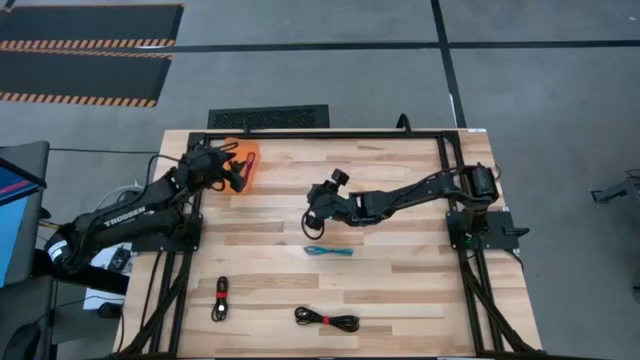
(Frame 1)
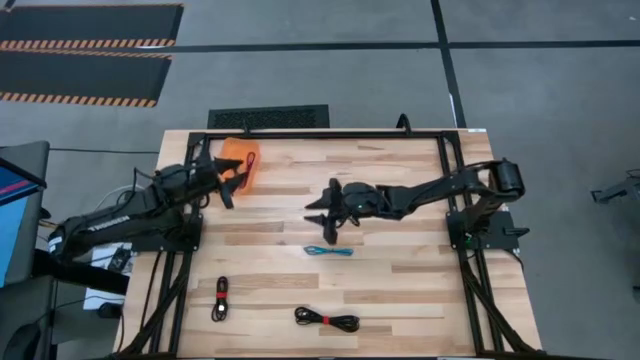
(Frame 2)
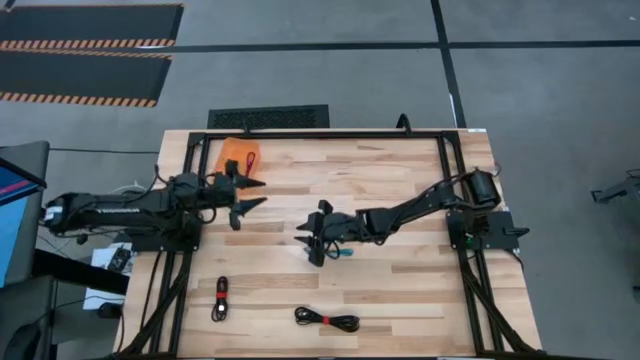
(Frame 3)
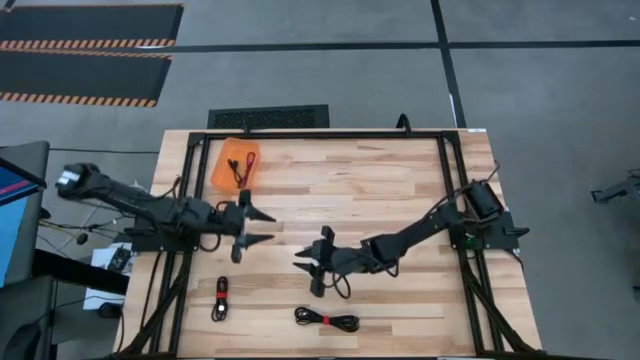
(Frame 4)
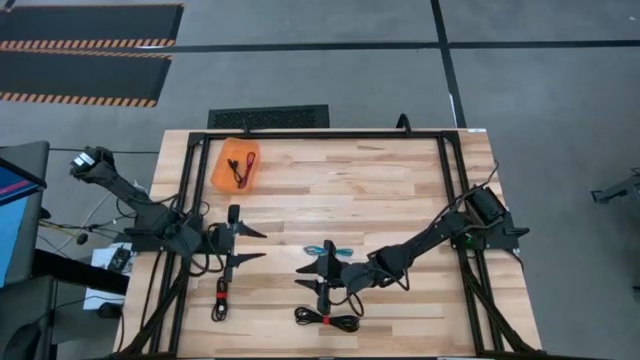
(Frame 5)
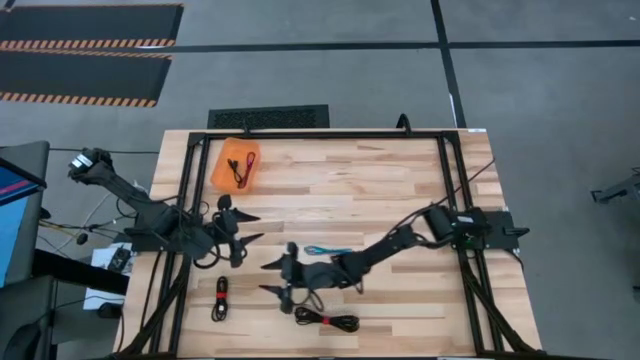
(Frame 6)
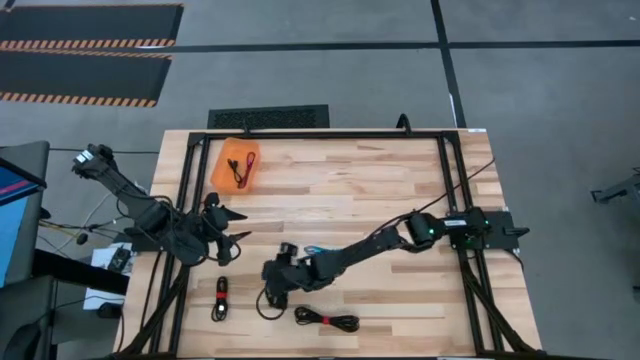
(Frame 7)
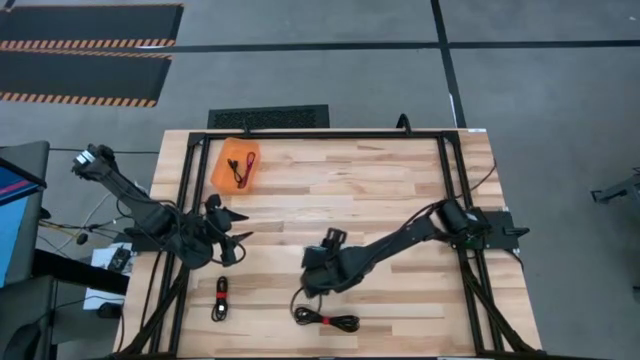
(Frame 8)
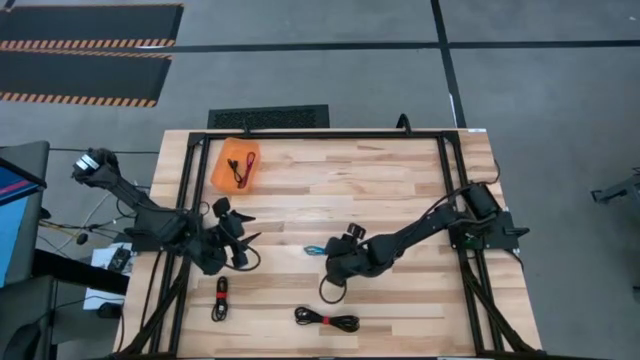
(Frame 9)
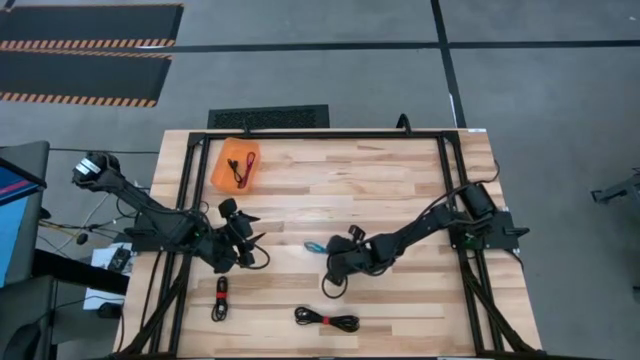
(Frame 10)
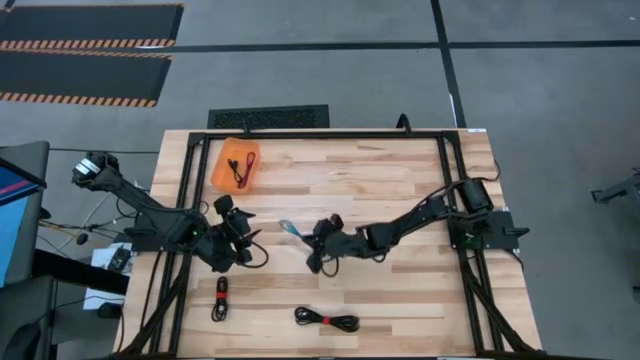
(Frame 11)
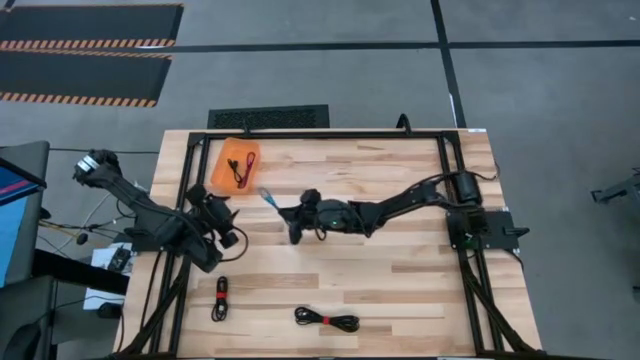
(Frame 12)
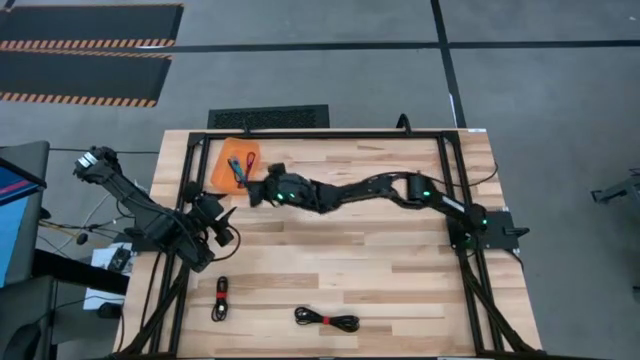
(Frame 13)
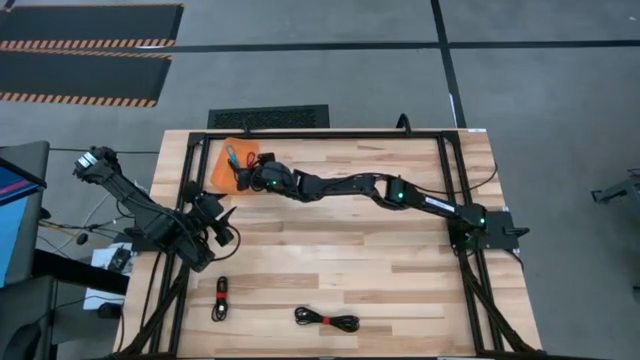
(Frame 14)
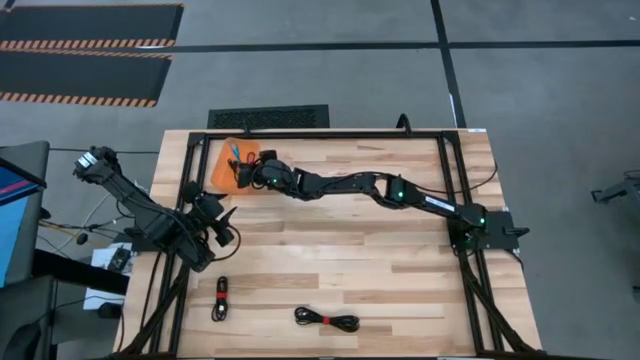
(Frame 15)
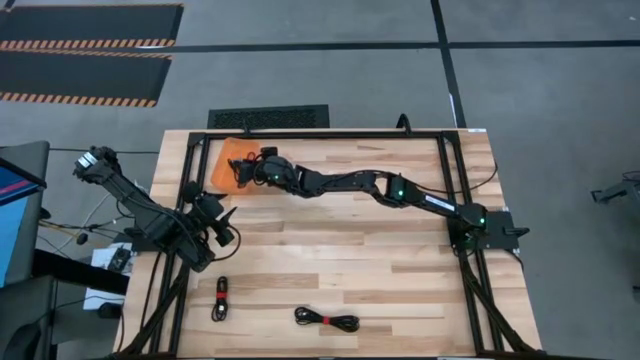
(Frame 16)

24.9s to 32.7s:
Task: Pick and place USB-C Cables
Put the blue charger cable into the orange bin

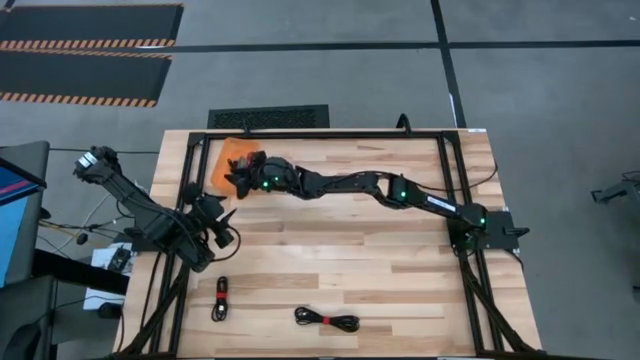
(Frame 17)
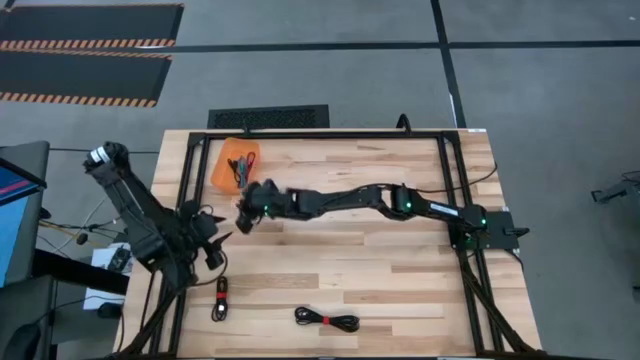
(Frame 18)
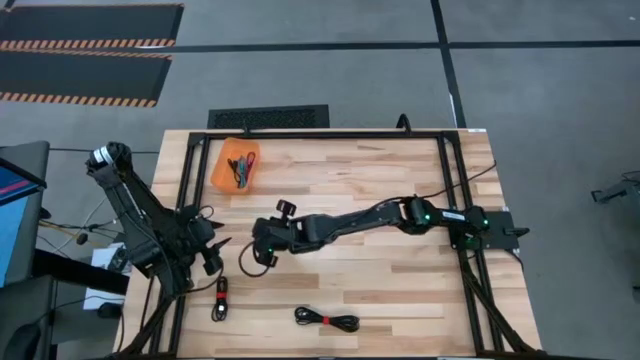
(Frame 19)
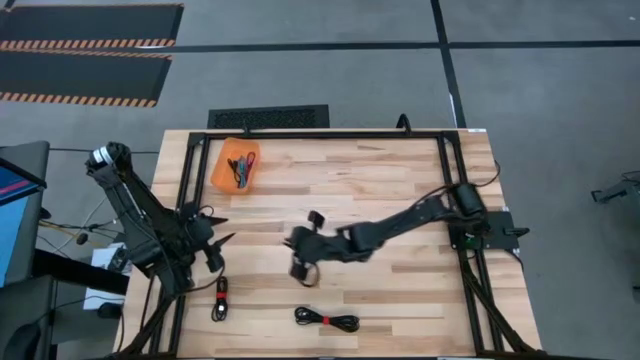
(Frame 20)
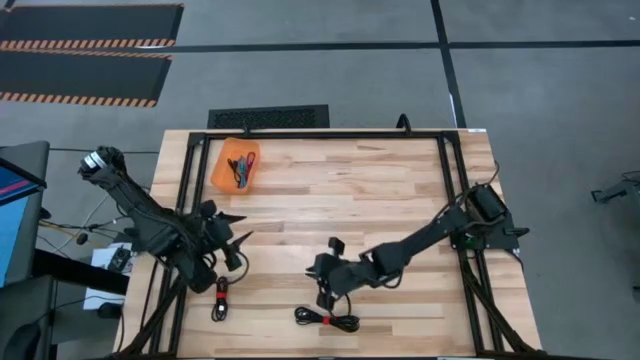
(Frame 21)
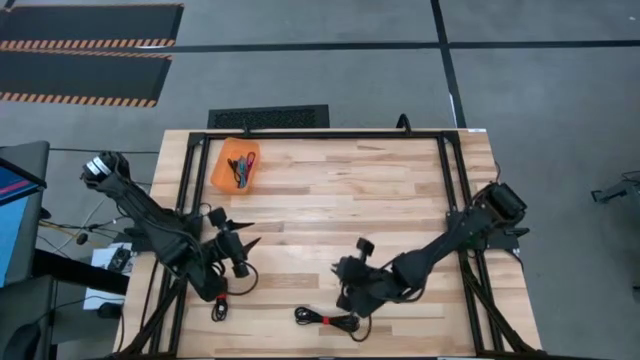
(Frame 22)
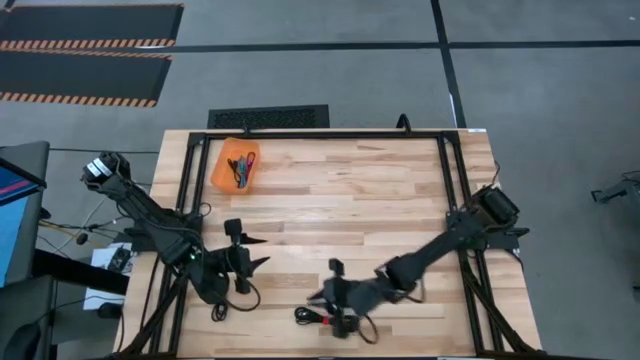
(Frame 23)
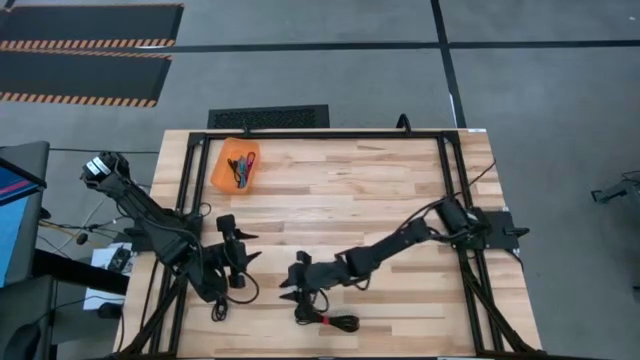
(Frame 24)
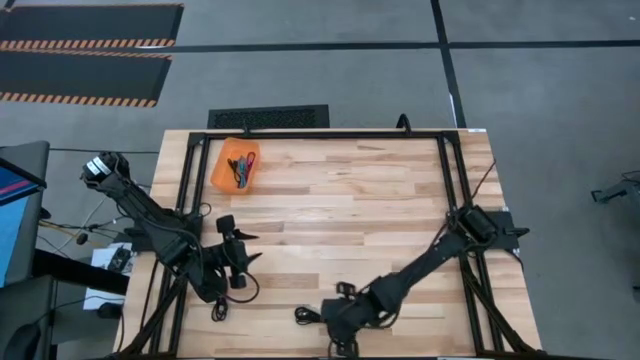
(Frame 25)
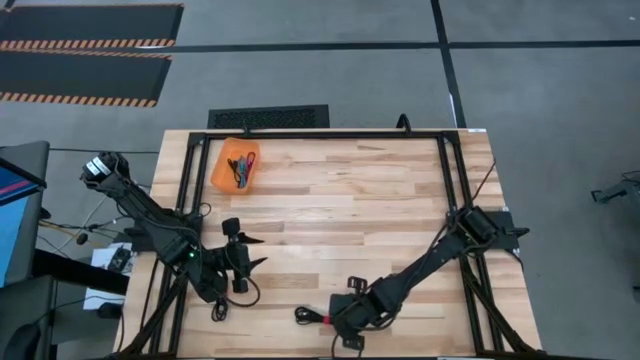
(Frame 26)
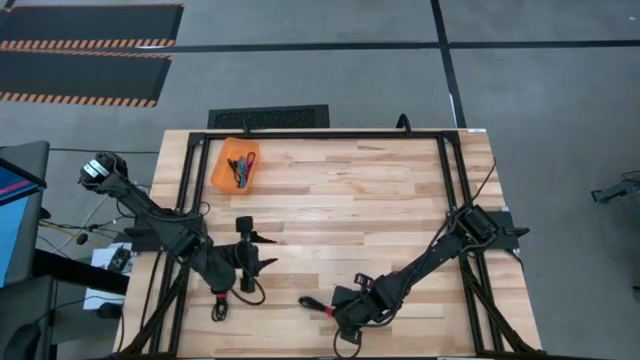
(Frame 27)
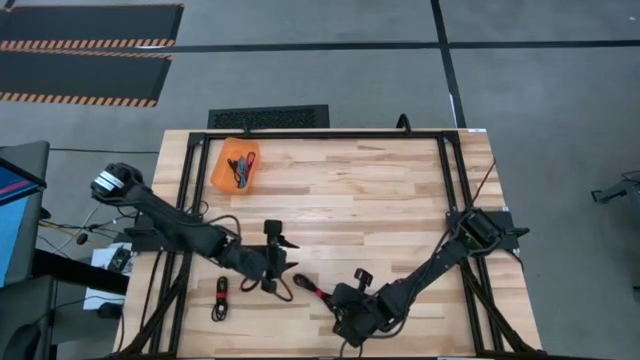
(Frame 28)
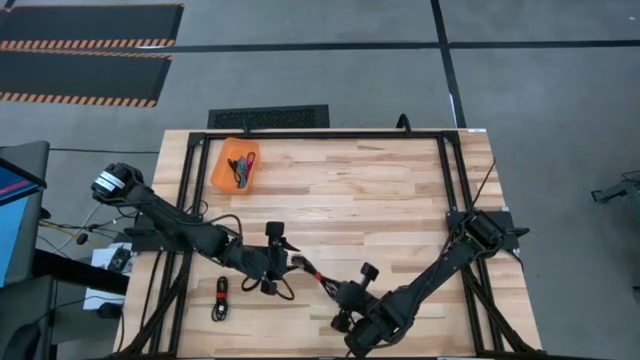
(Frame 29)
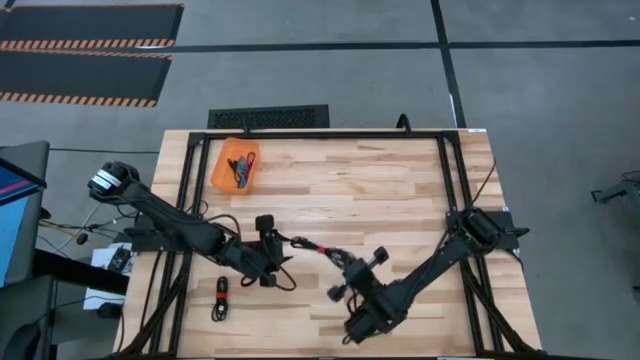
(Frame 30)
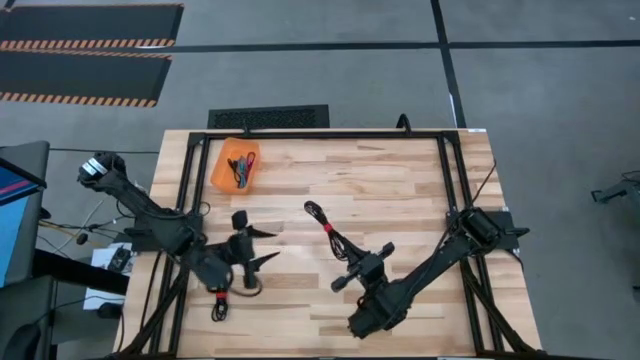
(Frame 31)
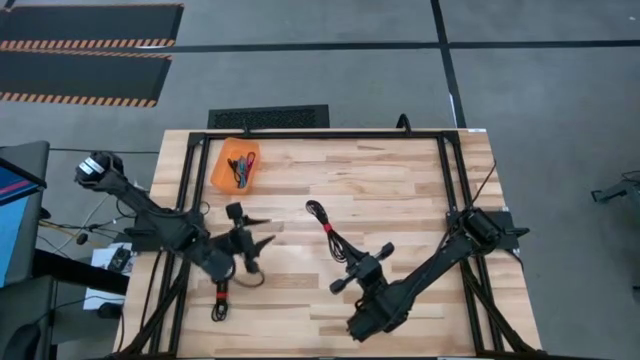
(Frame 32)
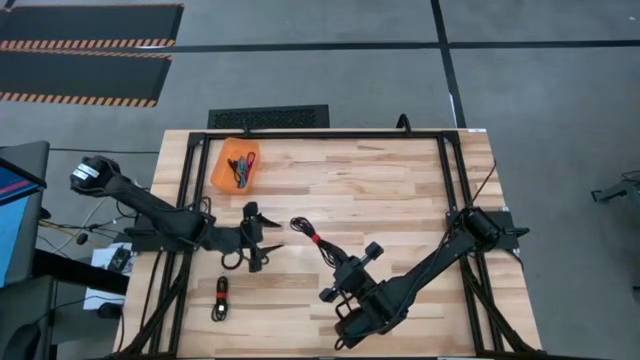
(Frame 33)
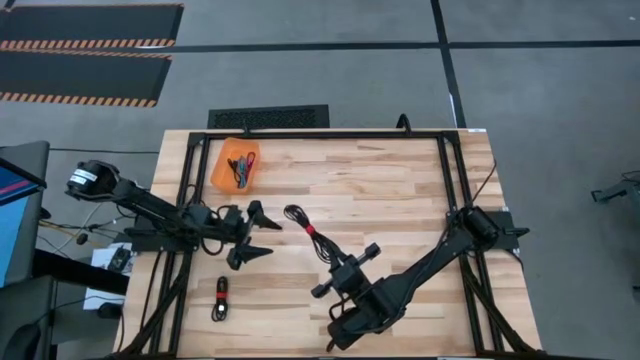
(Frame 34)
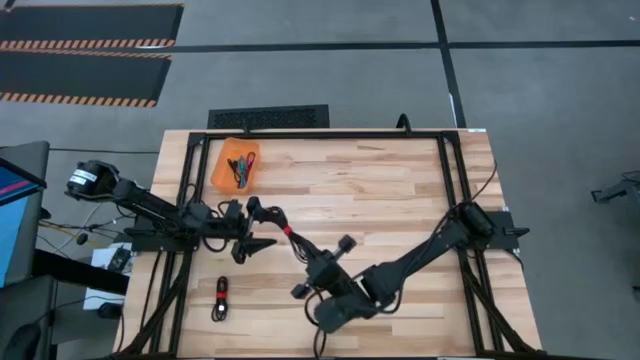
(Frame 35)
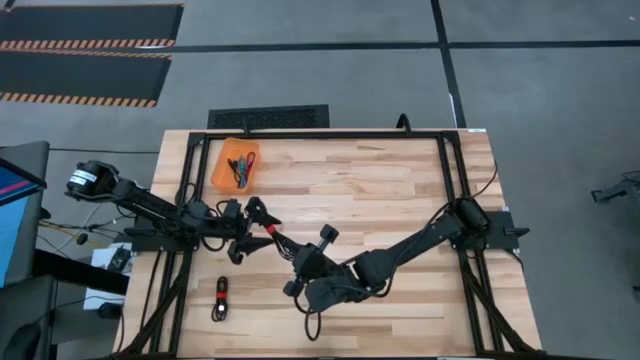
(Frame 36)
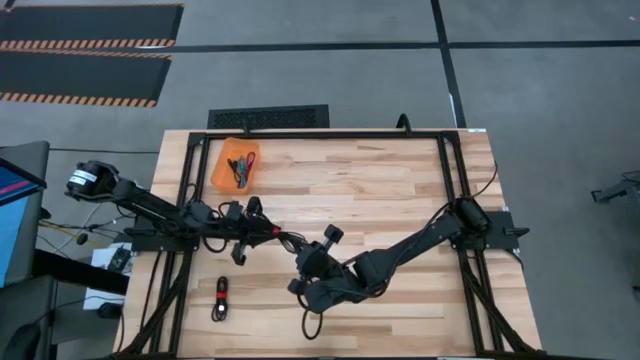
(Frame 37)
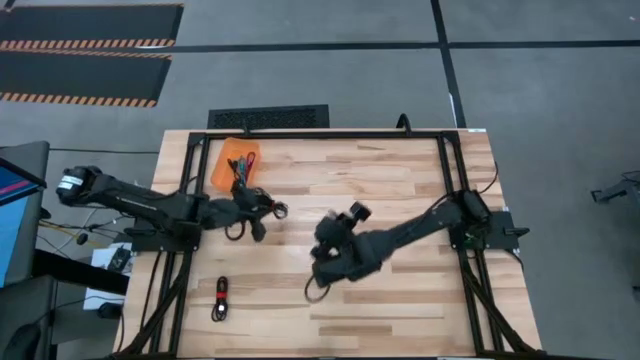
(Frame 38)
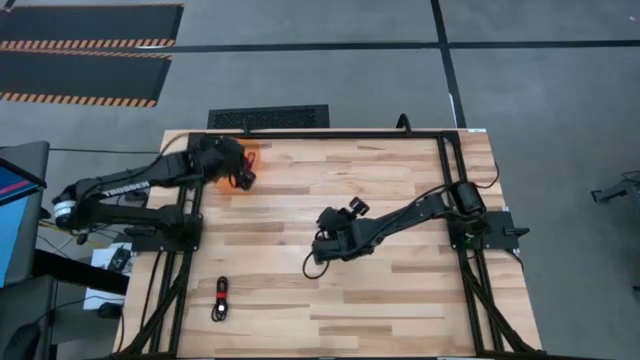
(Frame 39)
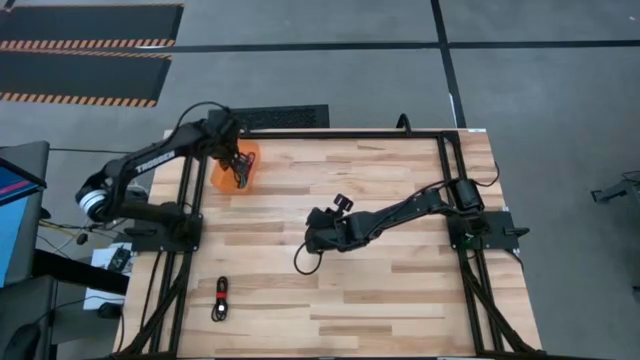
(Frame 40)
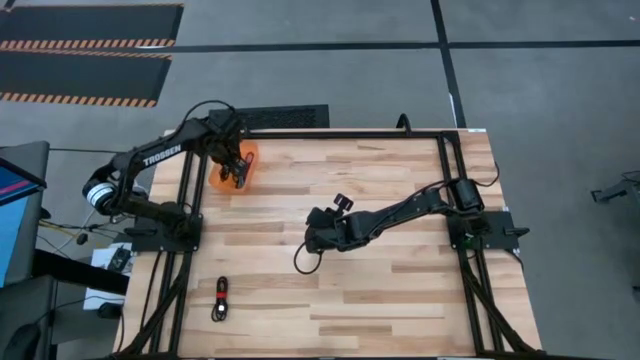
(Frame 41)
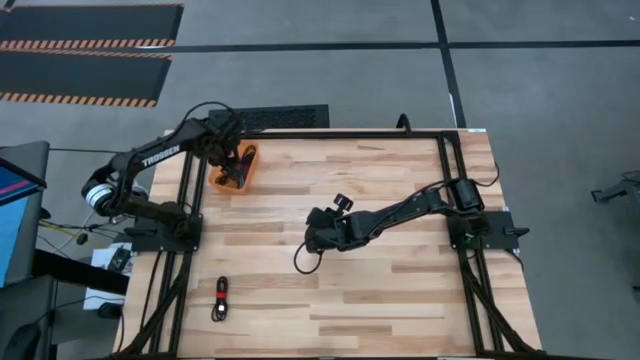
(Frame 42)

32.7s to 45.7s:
Put the right black charger cable into the orange bin
